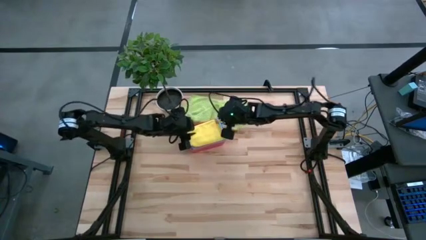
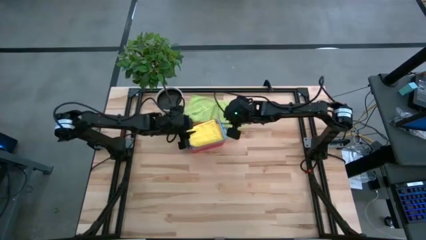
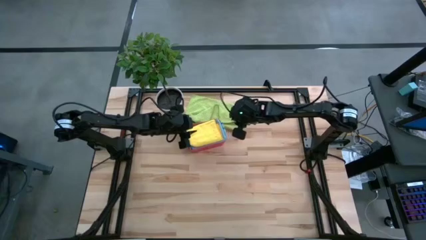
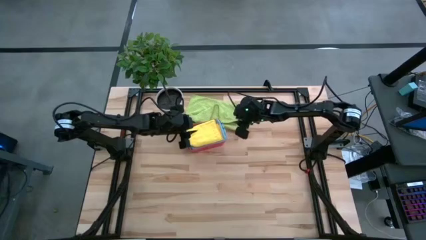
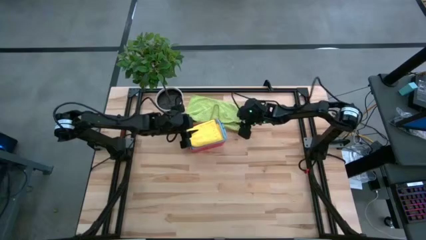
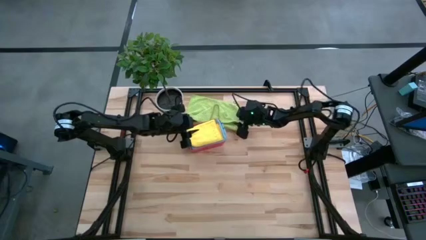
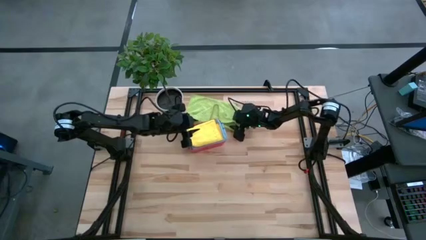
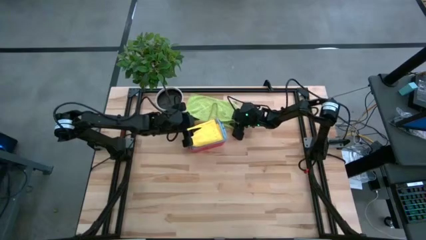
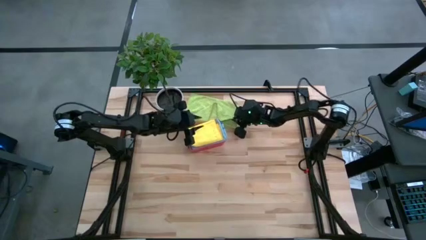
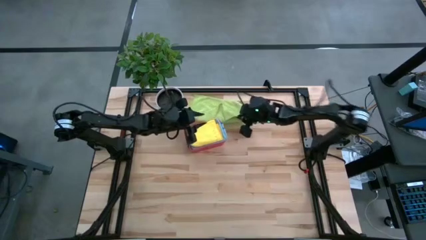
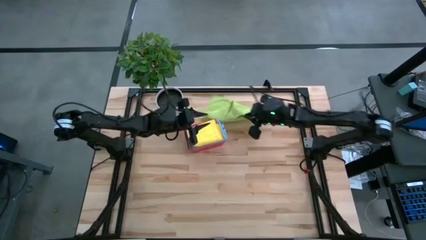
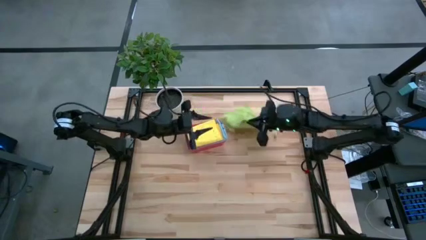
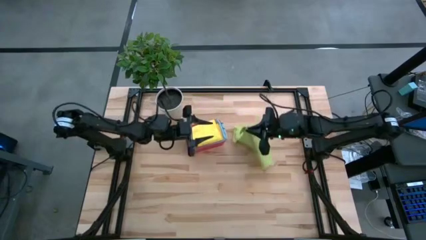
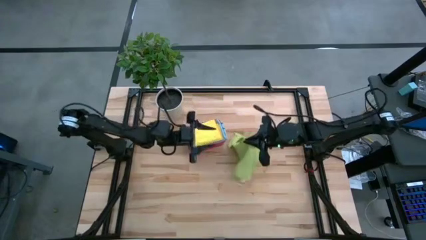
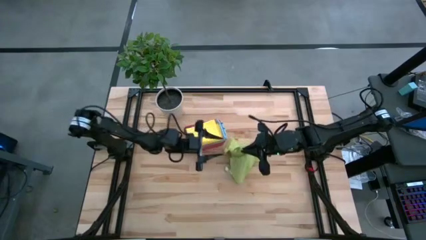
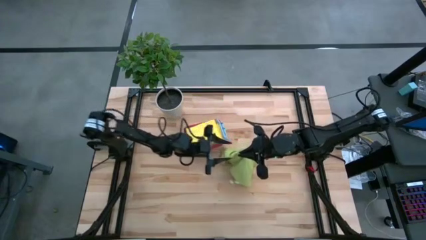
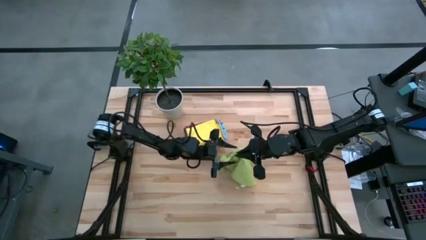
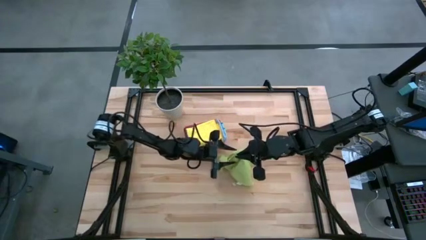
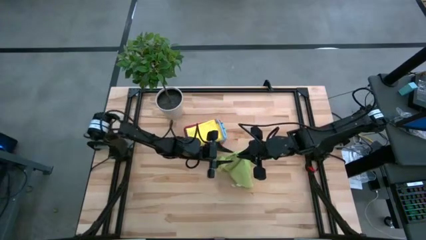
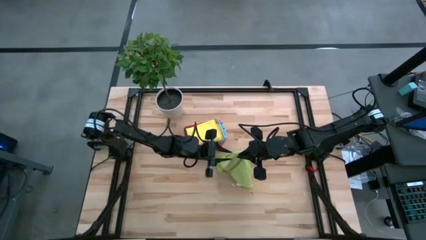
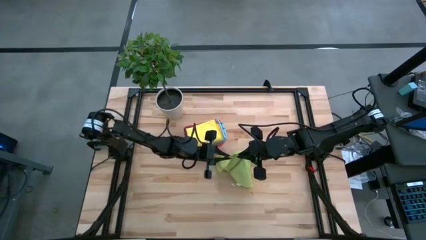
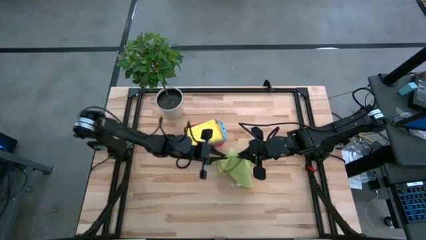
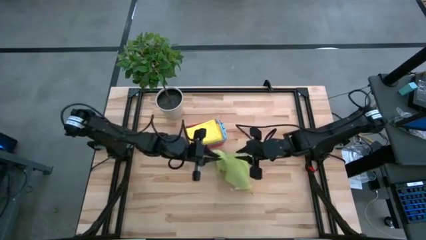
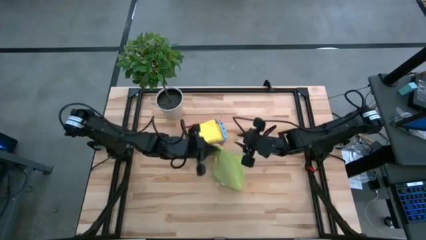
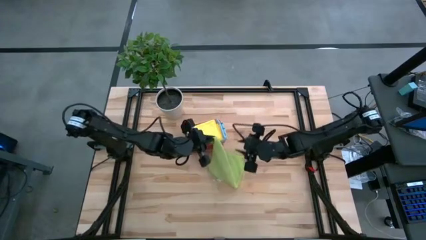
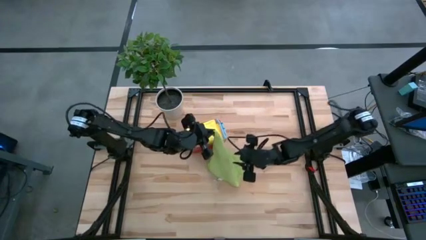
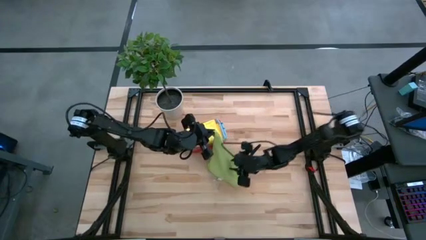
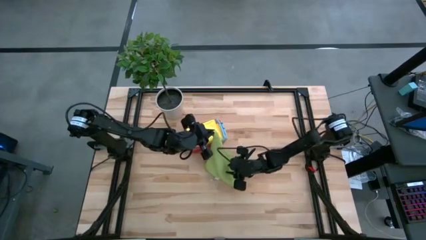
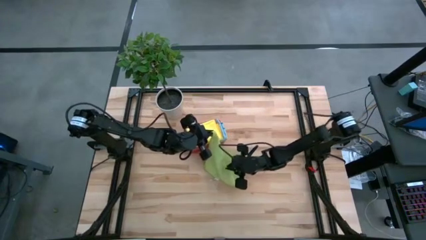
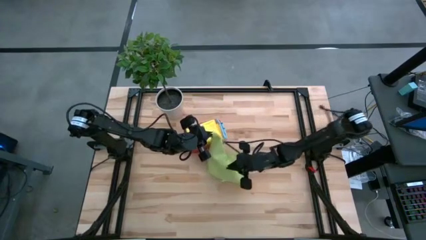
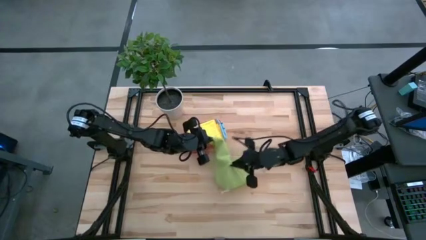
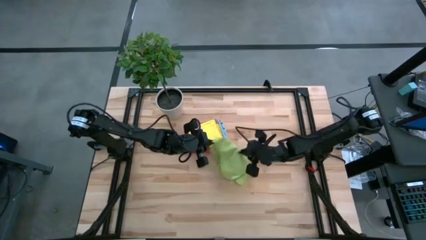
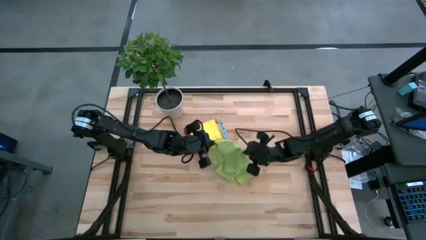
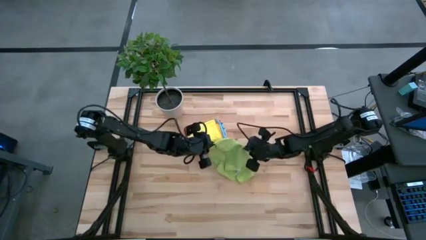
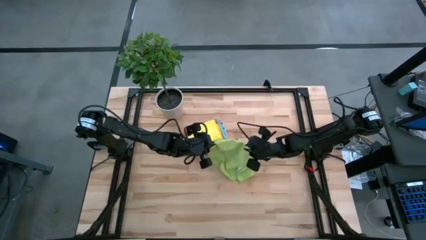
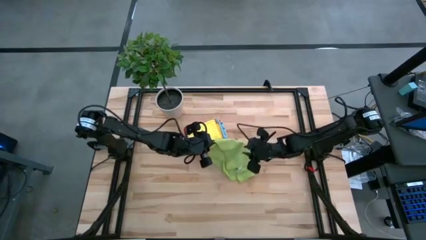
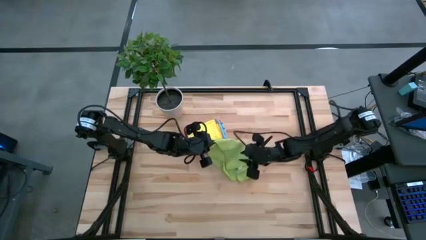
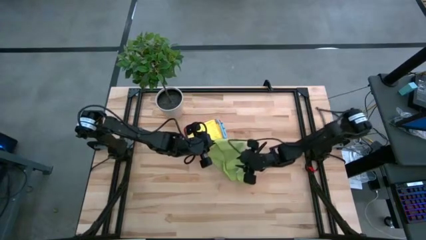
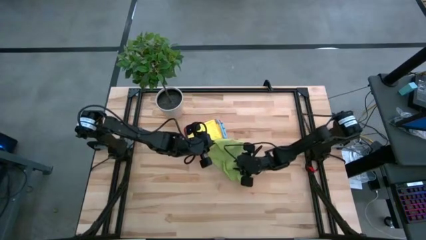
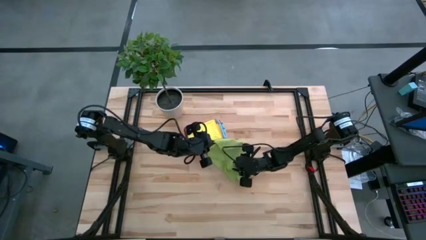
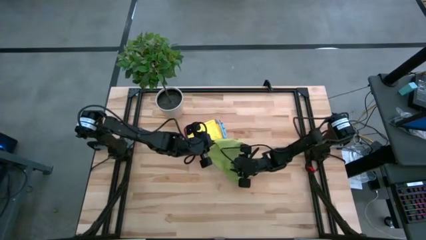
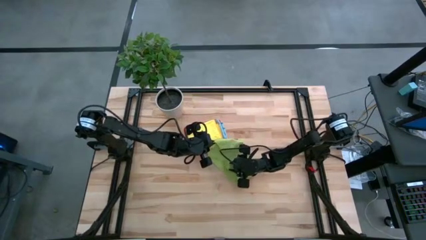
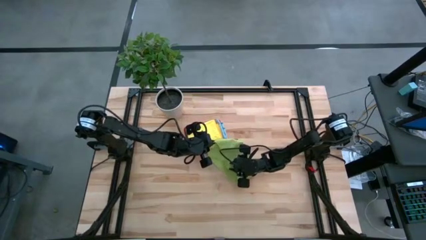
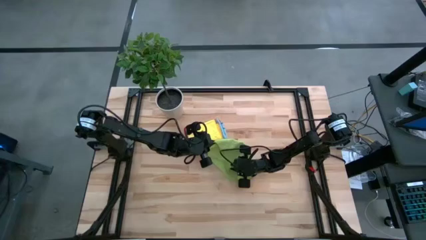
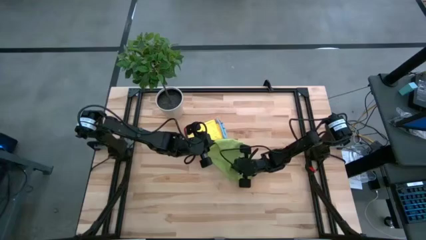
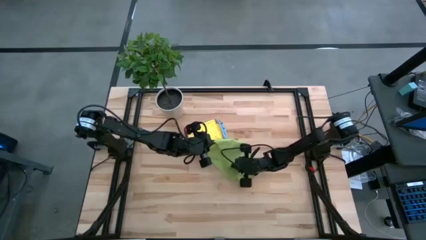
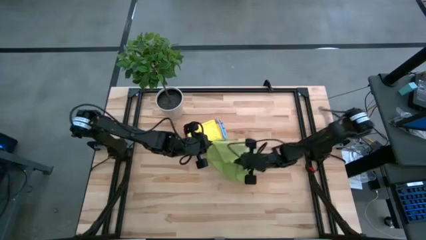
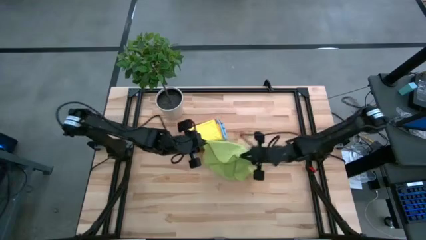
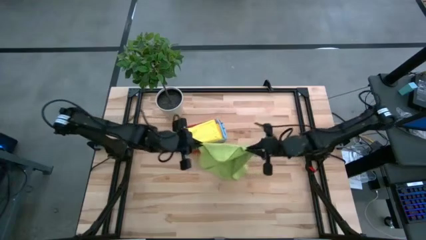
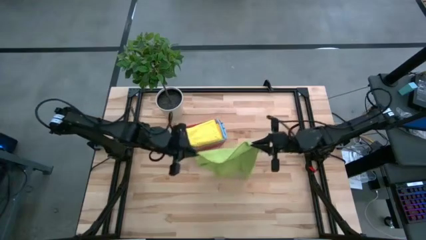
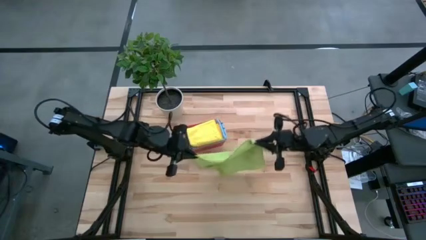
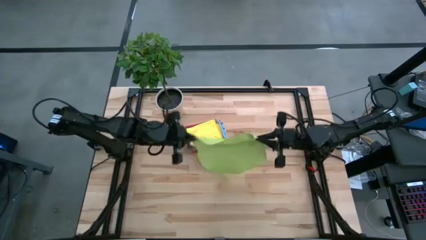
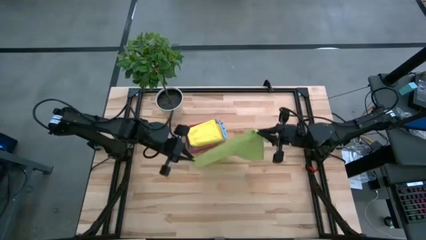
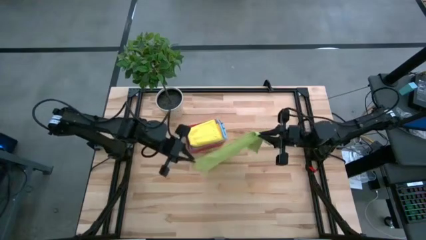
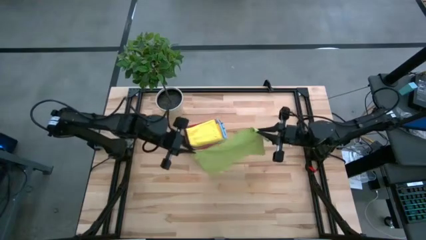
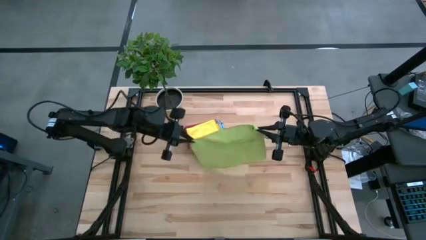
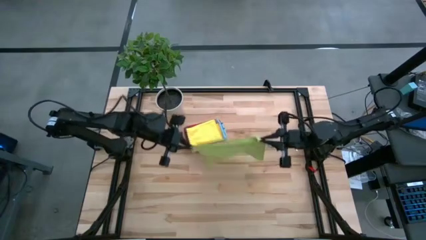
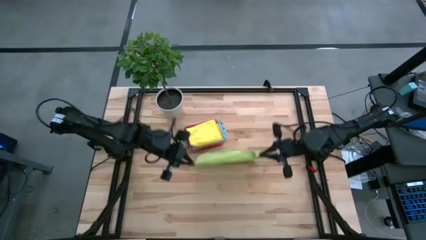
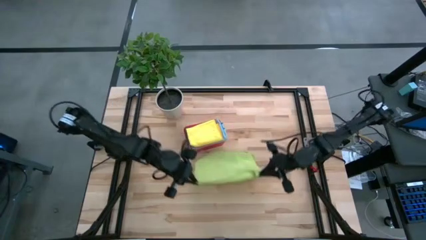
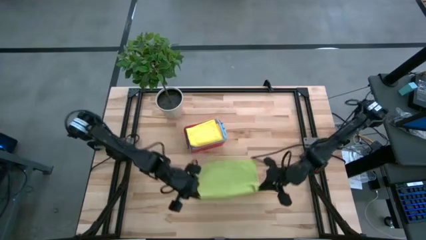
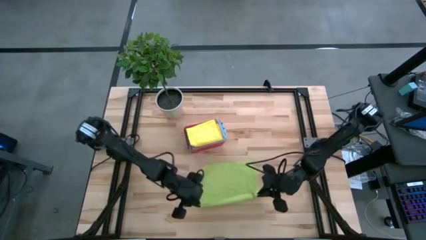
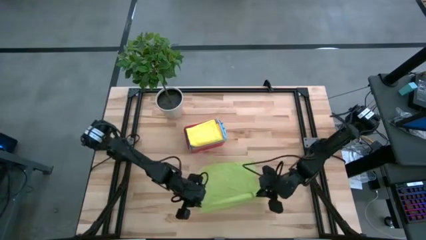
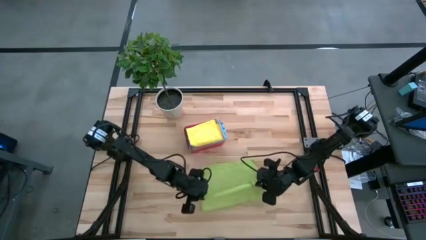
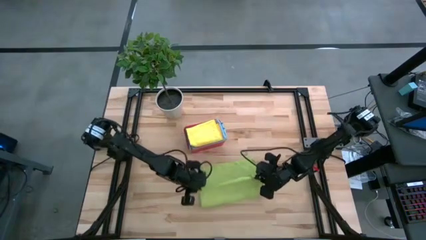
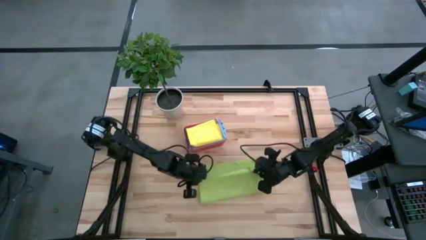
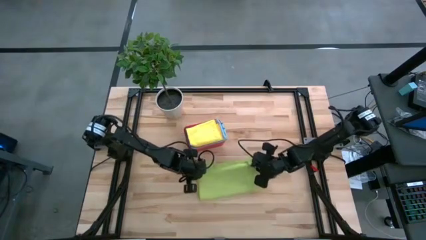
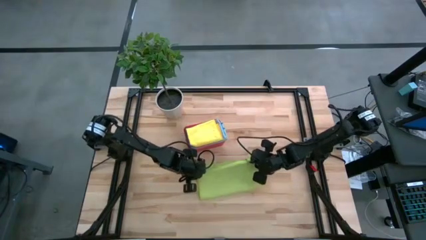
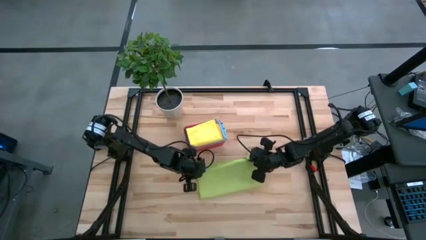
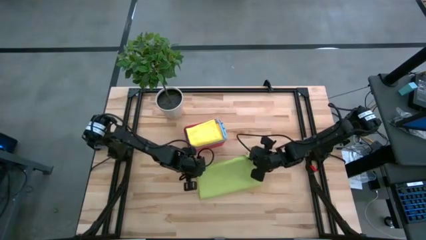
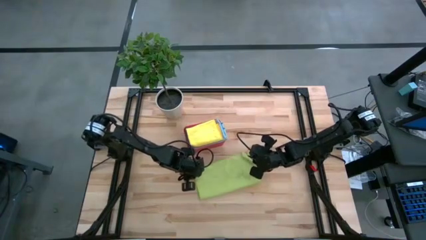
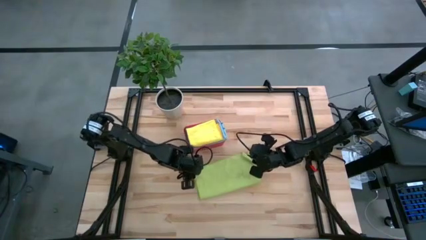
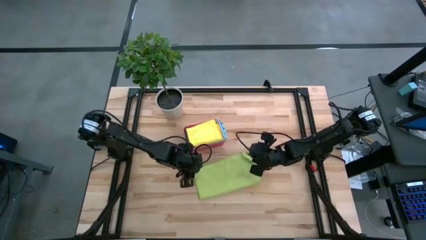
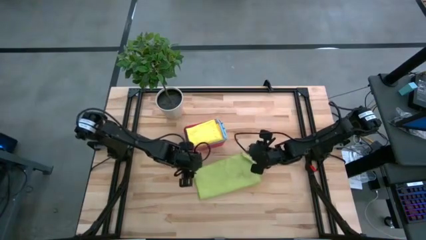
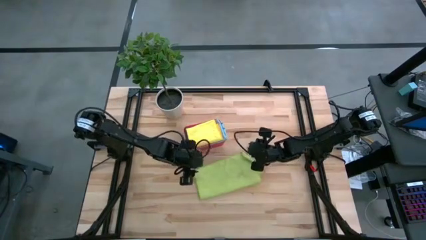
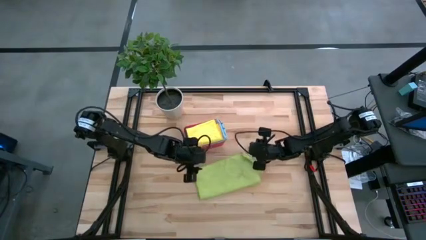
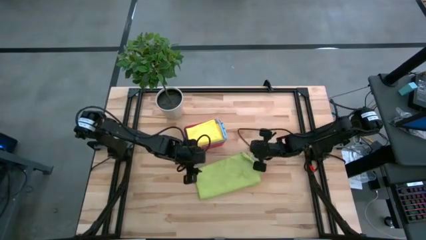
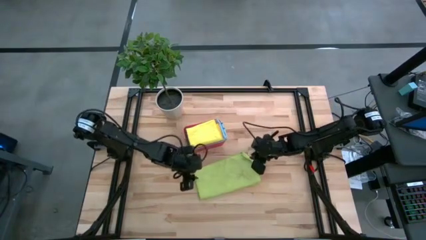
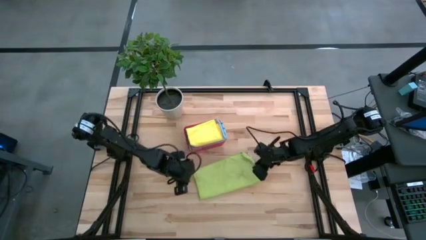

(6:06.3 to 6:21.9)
Task: Fold microfiber towels
Fold the green microfiber cloth

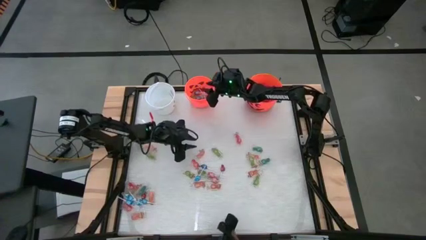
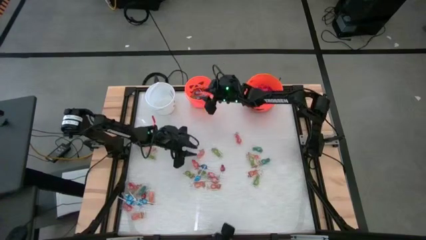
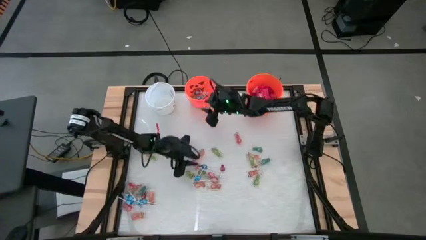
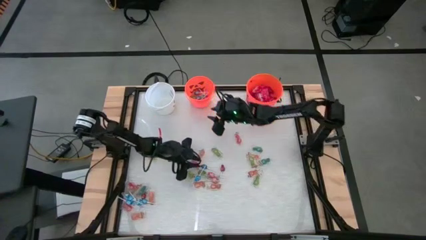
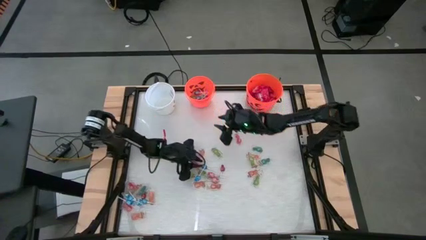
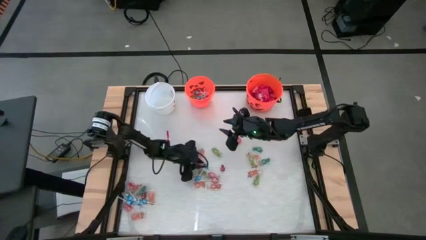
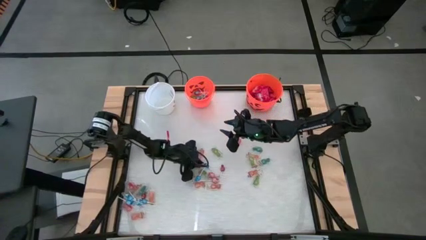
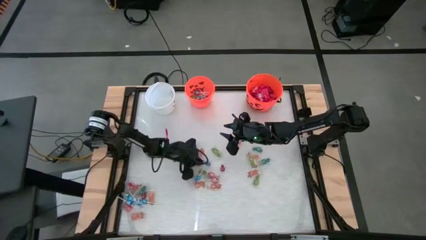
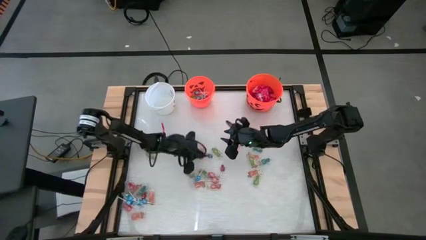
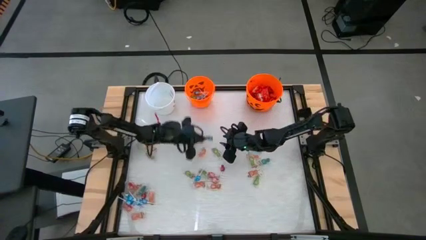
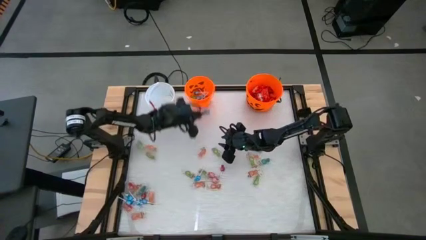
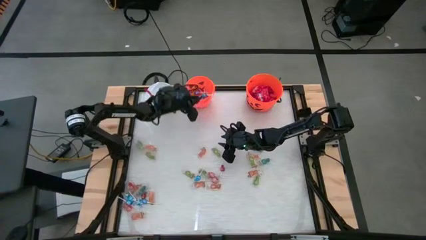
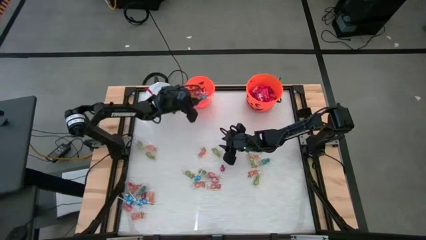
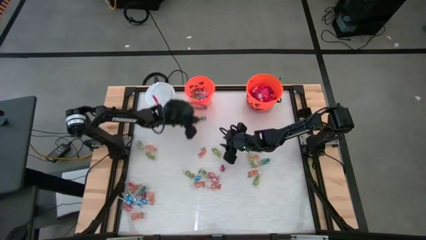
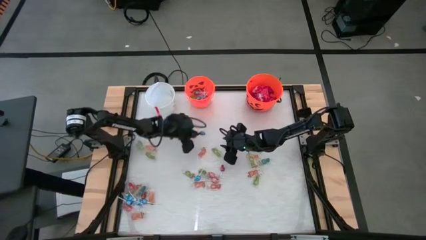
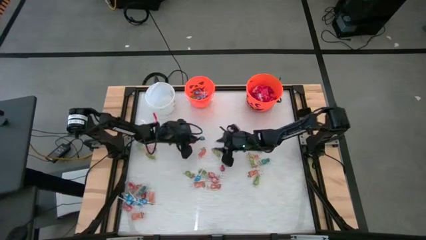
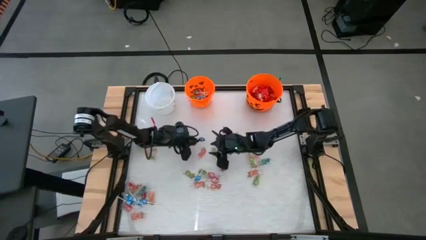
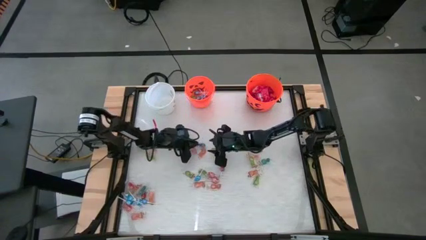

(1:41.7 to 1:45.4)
Task: Sort candy by brand, put in halloween buckets
Put the blue lollipop into the left orange bucket
